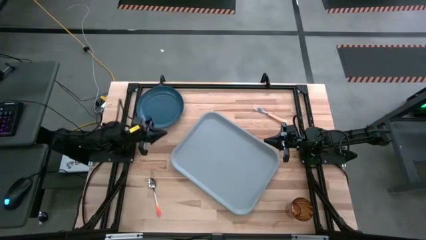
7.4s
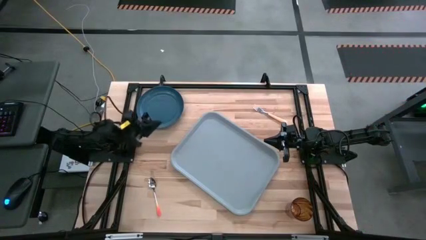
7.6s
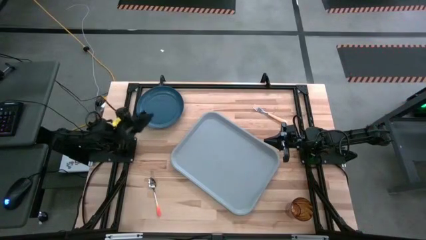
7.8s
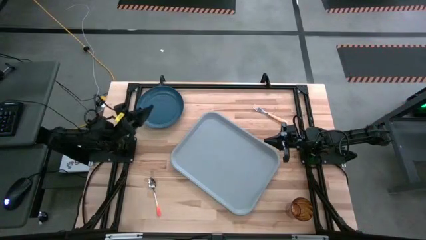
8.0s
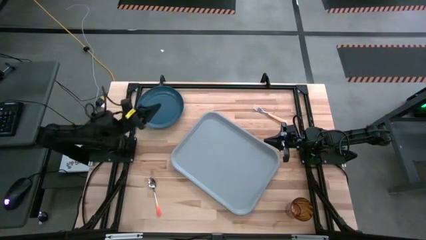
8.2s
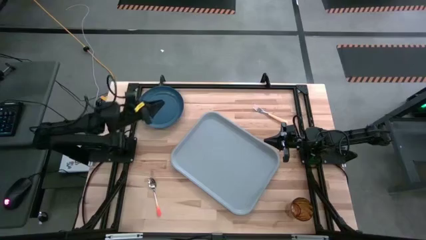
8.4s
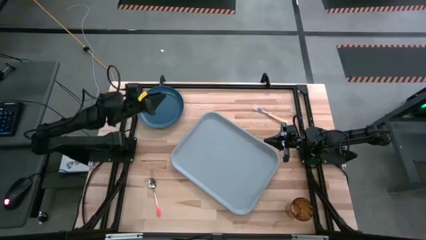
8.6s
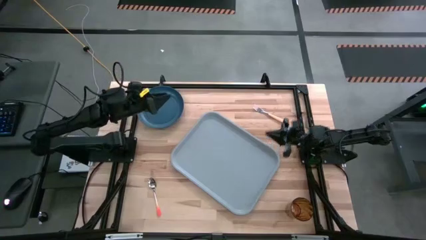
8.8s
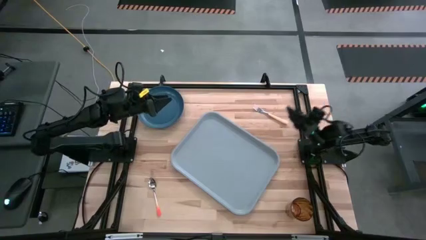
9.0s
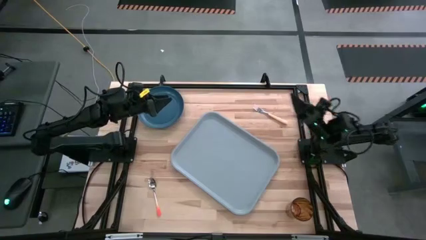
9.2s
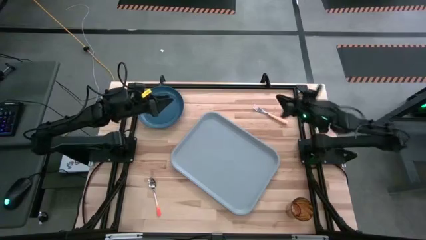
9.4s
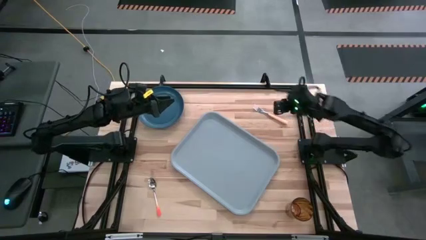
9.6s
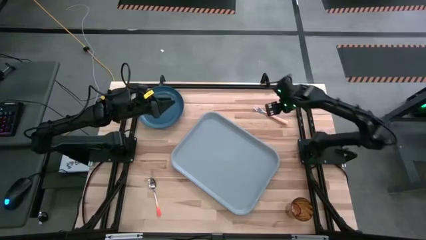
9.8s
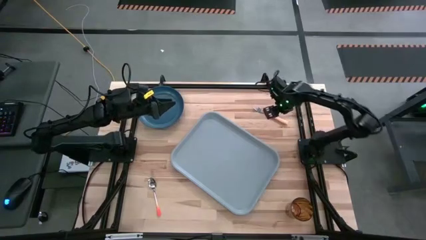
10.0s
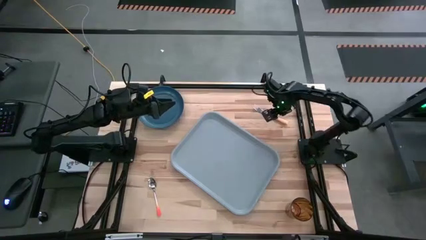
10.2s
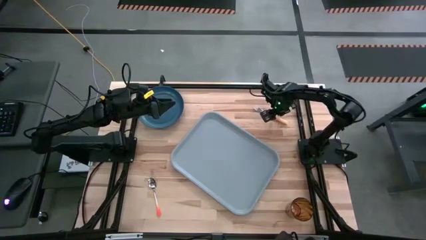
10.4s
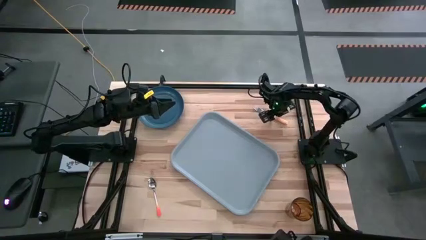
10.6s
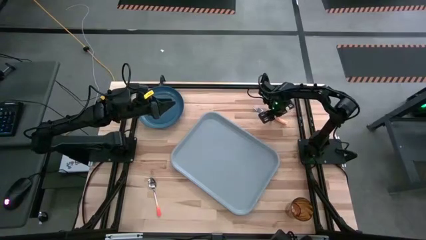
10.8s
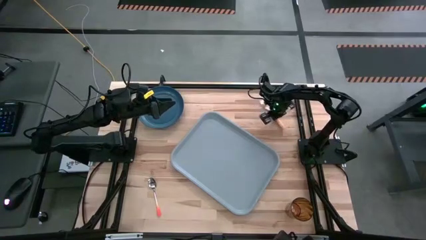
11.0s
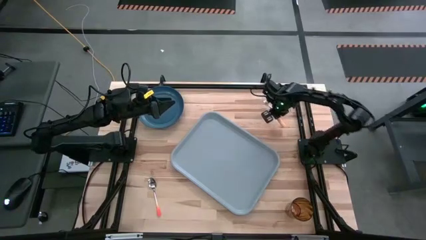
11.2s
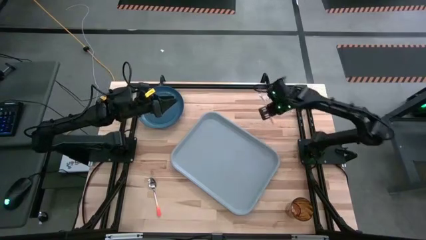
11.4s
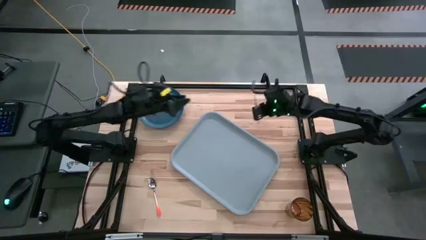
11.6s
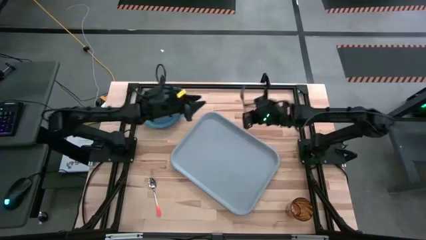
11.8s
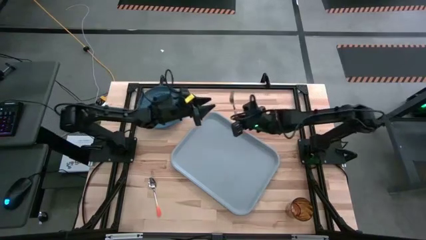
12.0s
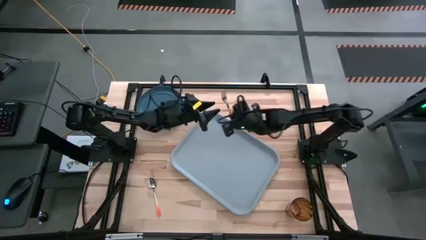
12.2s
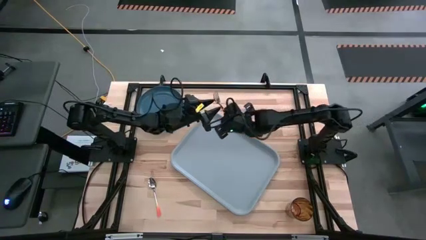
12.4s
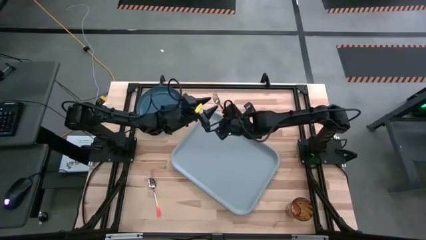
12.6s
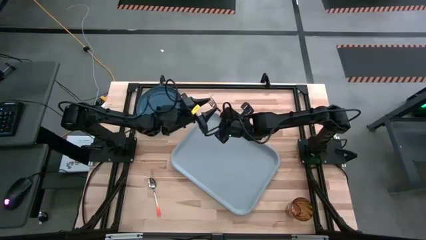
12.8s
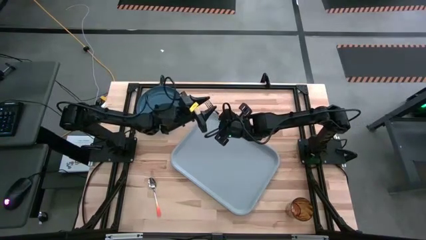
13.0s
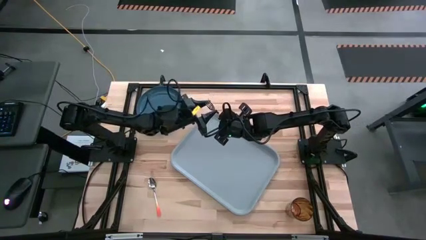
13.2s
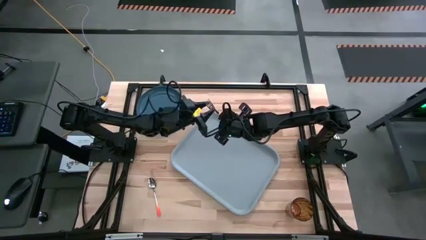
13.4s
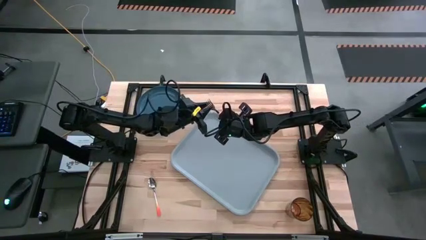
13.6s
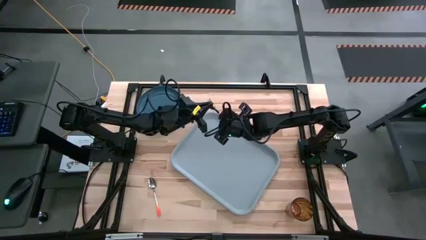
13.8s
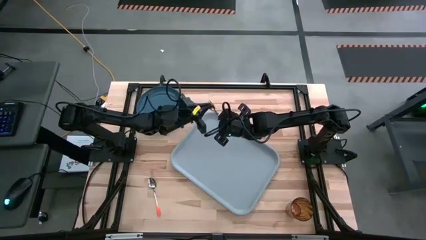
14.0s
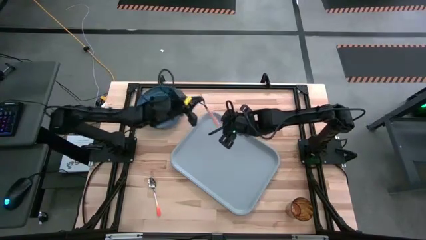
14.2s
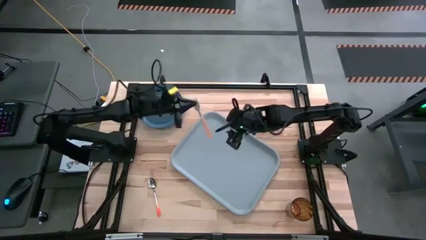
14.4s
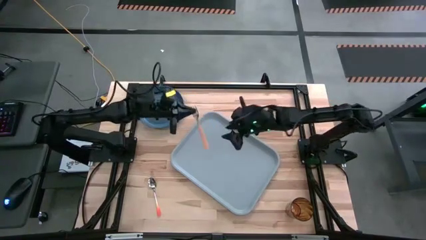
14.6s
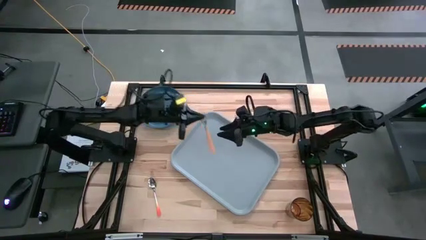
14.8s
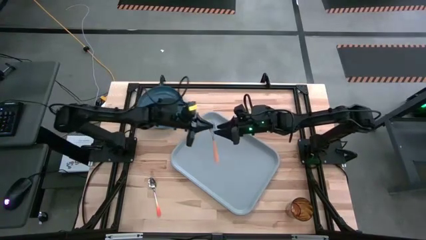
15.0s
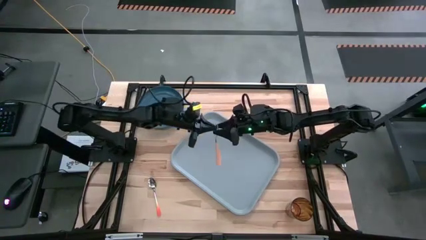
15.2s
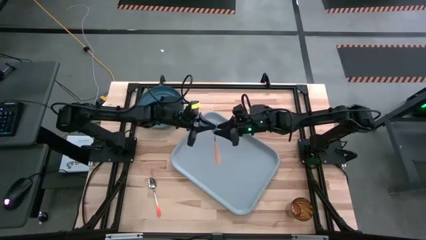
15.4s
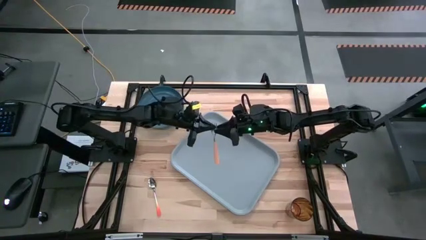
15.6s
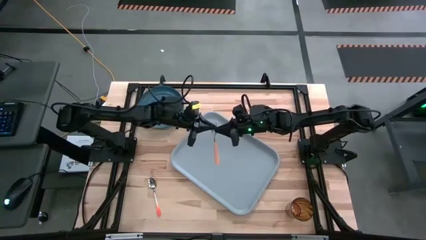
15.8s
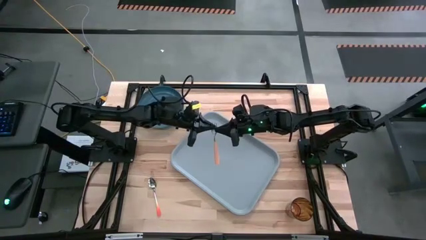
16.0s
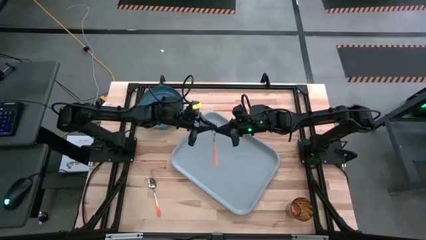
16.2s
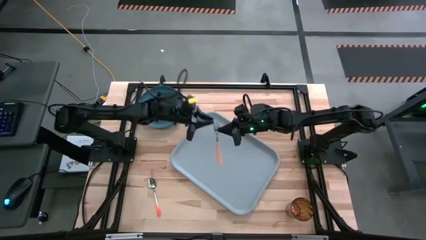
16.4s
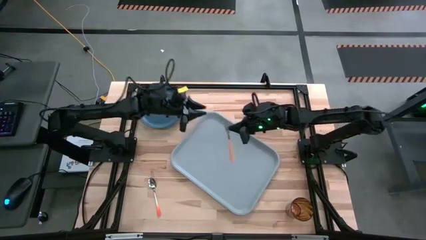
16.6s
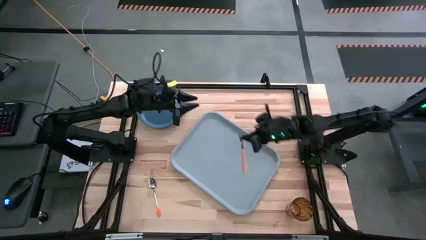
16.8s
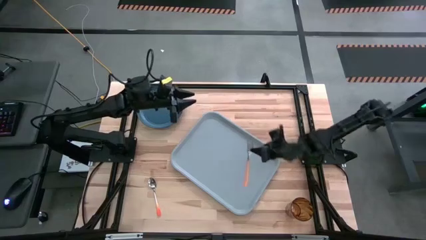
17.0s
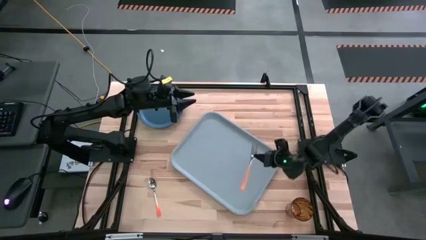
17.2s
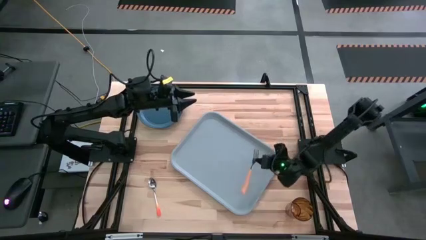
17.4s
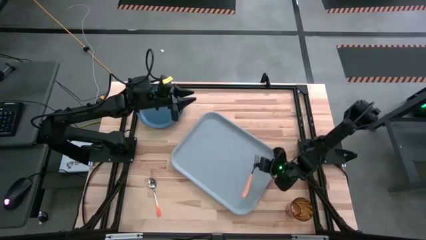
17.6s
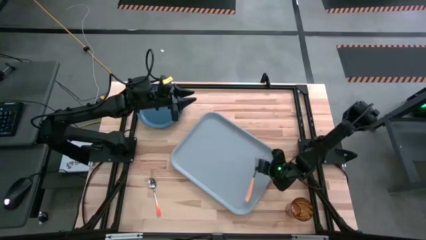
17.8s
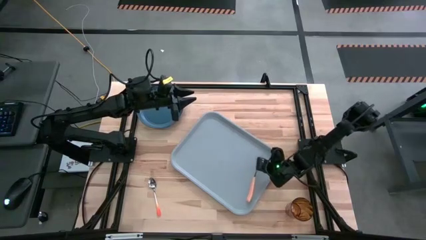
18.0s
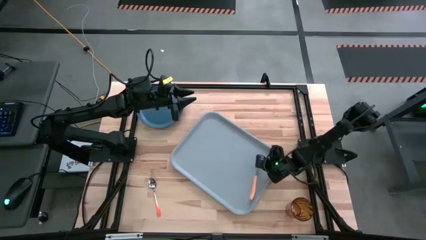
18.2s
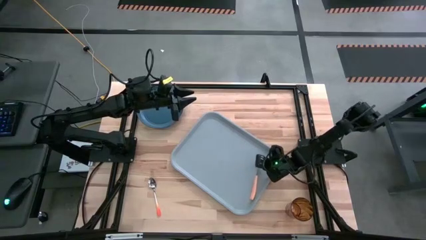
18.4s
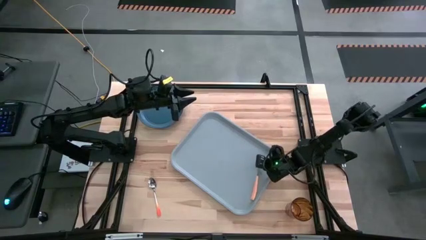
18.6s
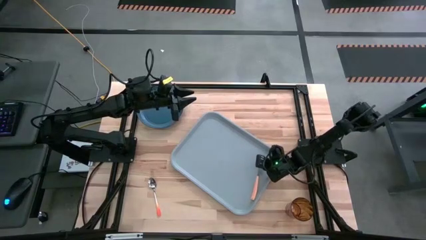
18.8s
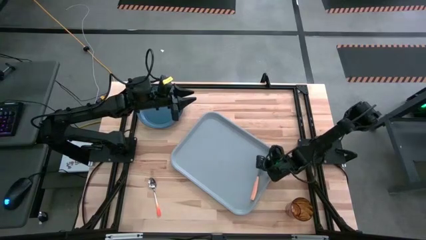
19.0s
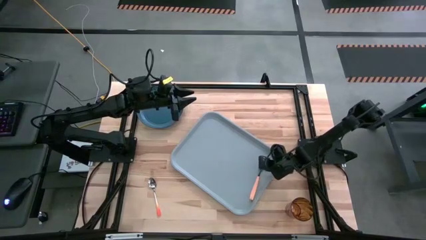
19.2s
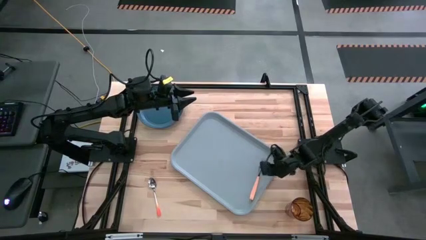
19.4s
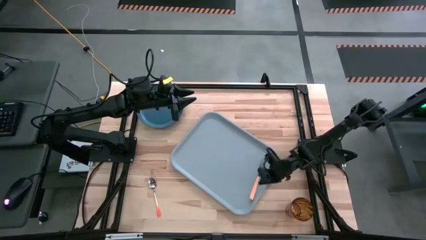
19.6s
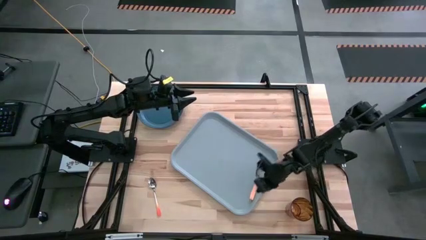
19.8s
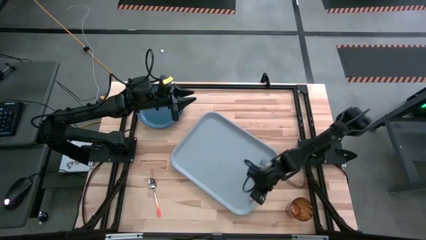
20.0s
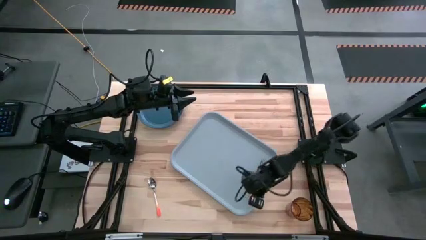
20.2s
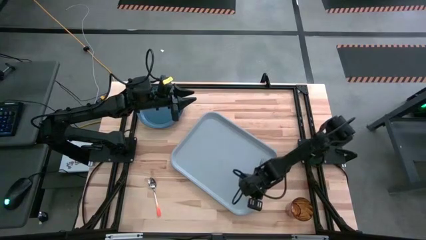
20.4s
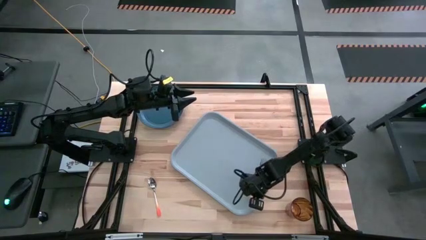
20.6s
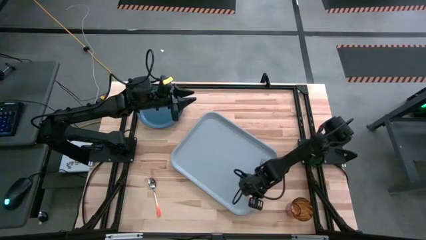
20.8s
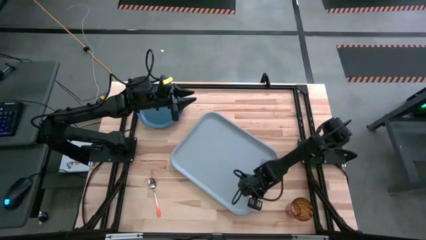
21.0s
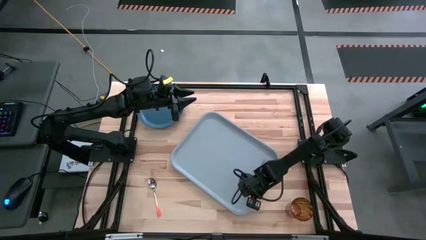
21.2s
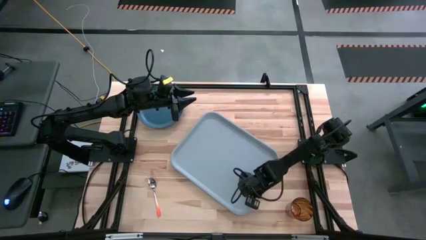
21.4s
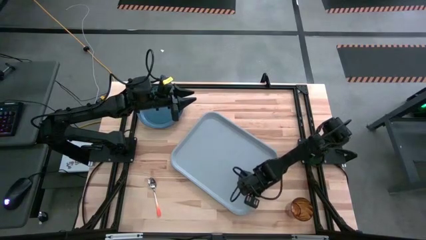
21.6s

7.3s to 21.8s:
Task: Pick and place plate/cup/fork/spoon on tray
Put the light orange fork on the gray serving tray

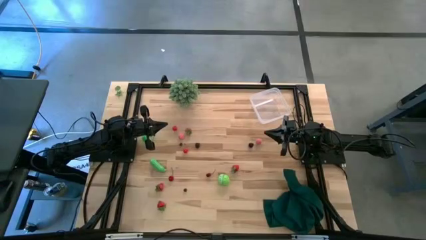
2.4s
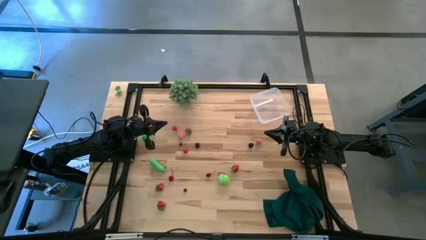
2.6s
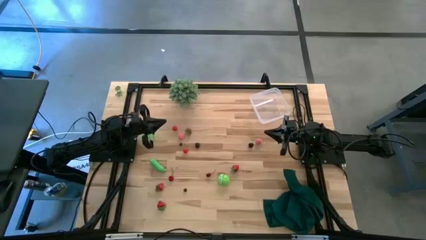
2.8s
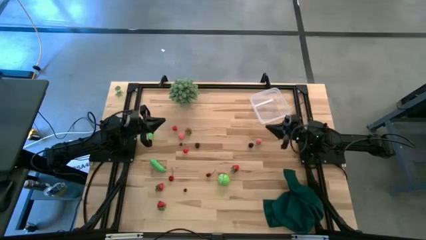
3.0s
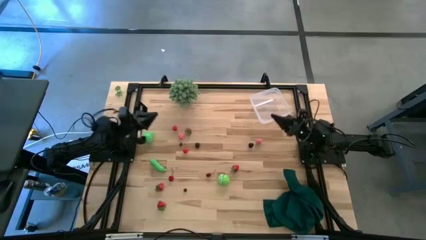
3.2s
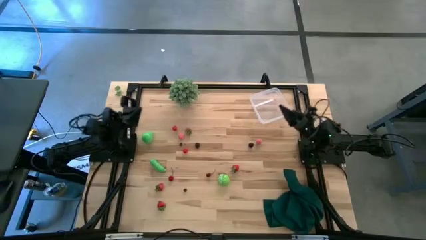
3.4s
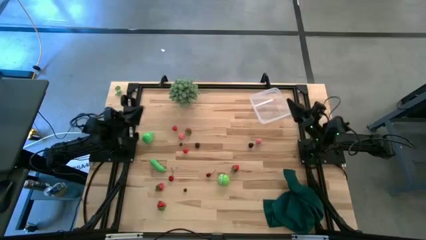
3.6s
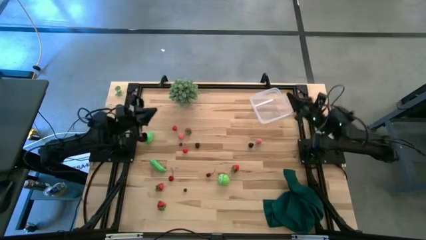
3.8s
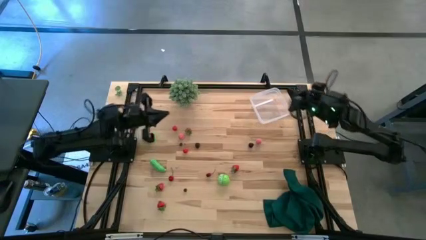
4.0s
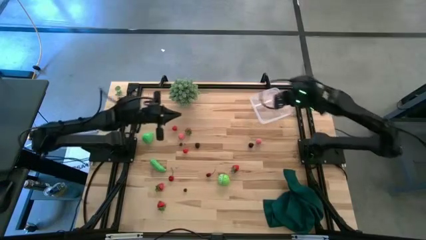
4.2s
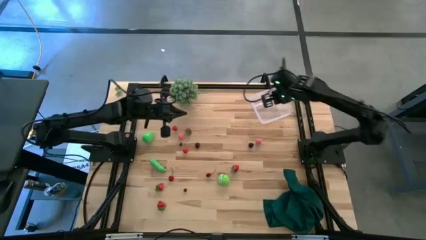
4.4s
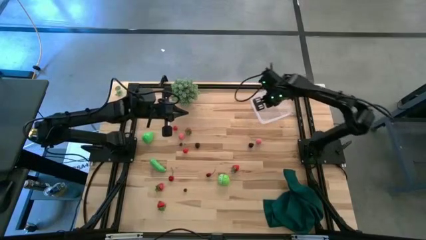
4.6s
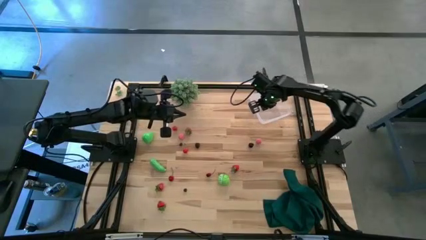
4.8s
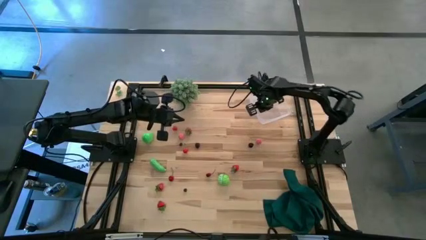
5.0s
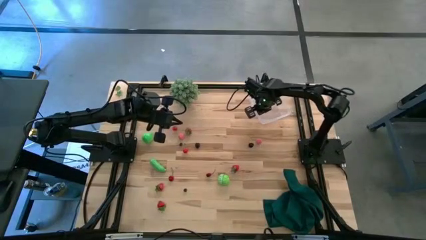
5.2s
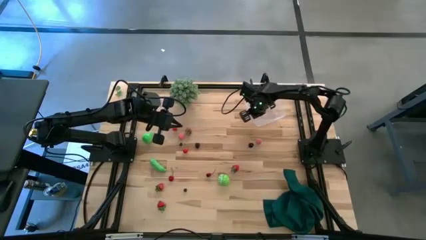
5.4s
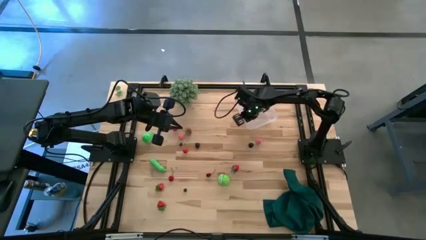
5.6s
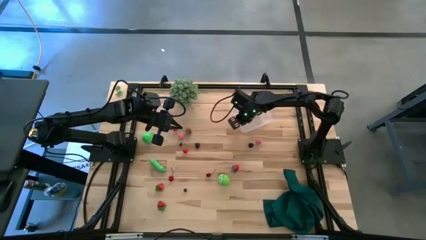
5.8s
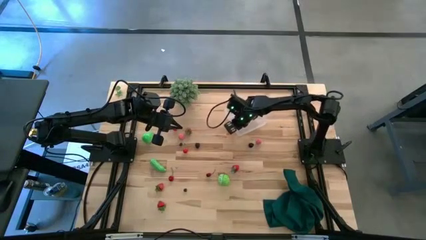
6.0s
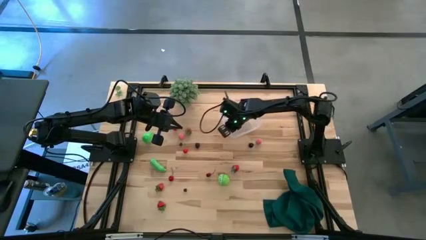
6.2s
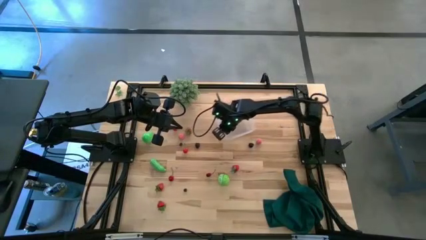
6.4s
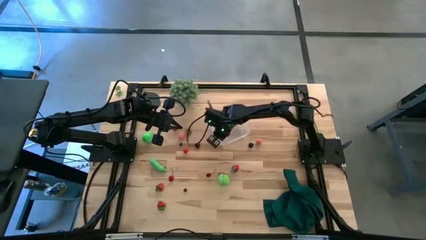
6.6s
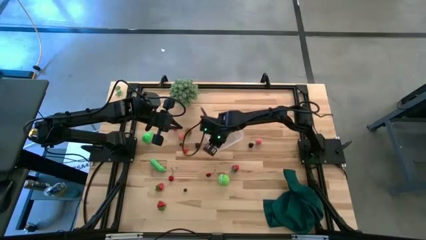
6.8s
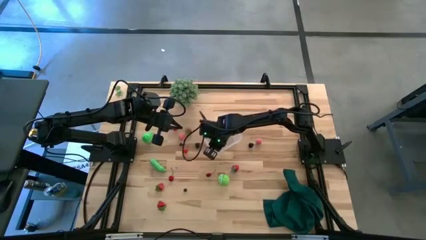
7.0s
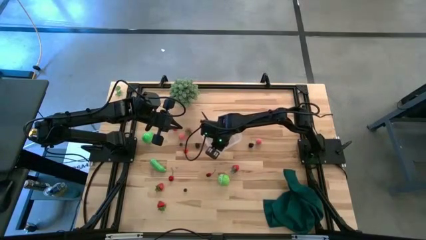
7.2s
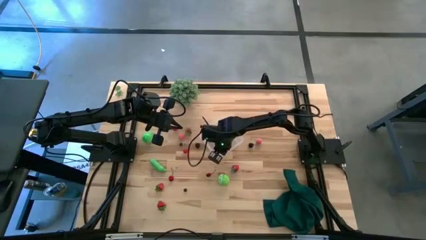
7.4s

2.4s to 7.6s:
Task: Pick and placing Produce into tupperware
Move the transparent bin to the center of the table
